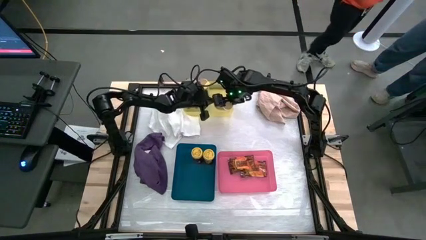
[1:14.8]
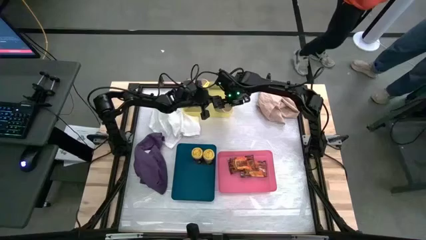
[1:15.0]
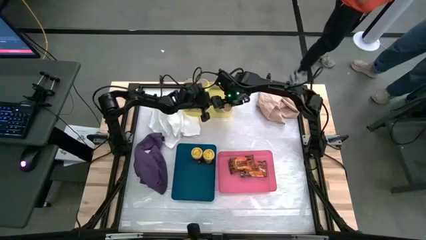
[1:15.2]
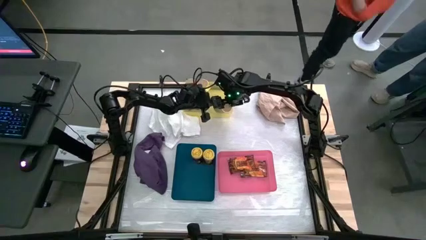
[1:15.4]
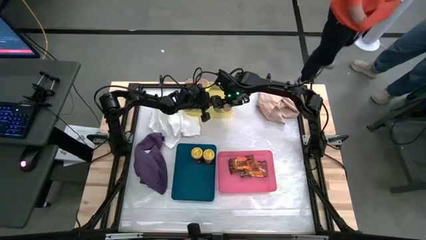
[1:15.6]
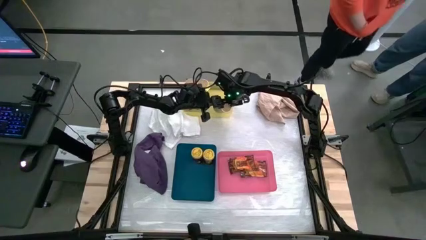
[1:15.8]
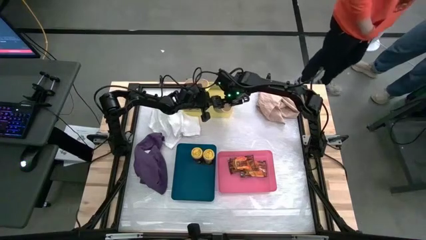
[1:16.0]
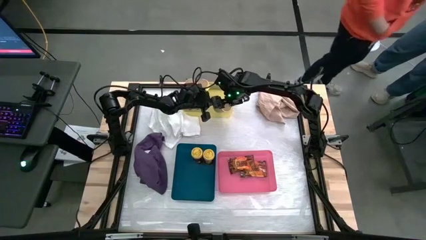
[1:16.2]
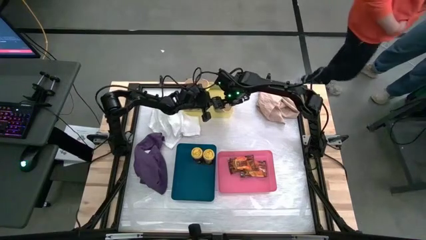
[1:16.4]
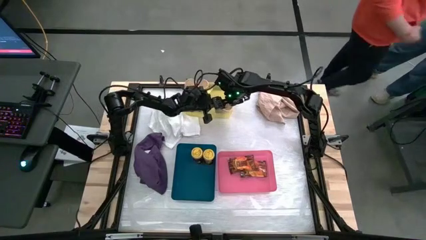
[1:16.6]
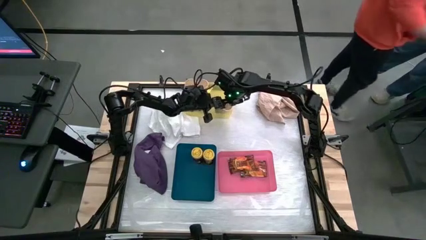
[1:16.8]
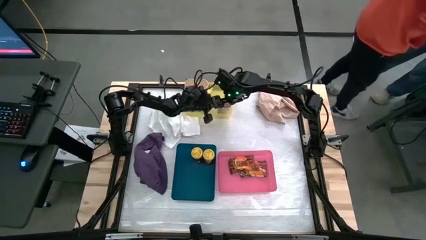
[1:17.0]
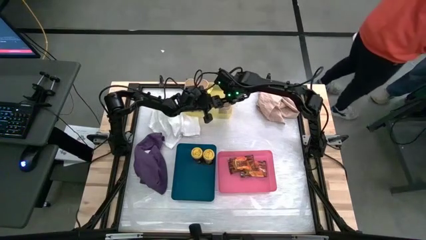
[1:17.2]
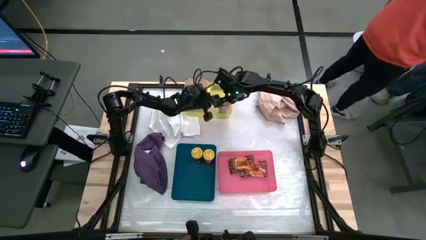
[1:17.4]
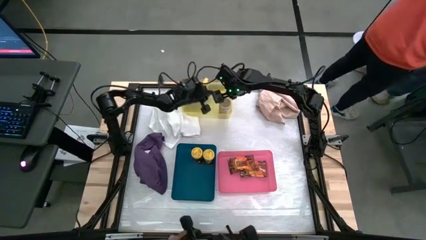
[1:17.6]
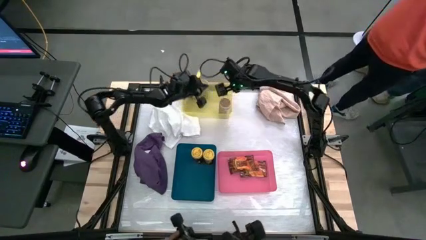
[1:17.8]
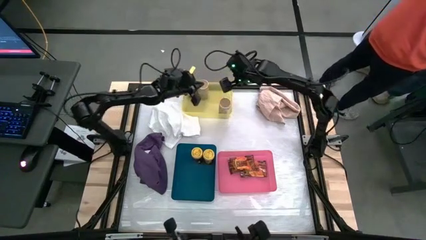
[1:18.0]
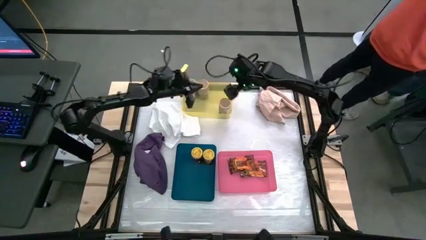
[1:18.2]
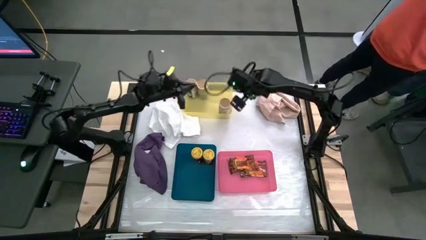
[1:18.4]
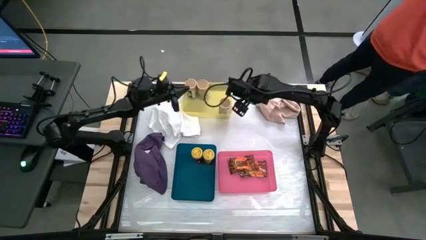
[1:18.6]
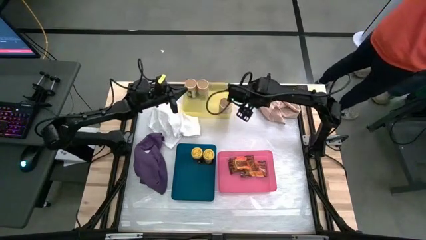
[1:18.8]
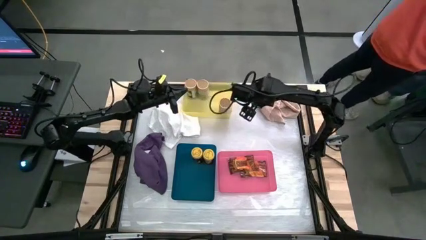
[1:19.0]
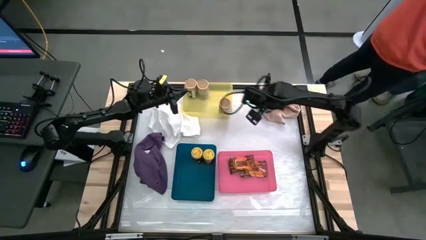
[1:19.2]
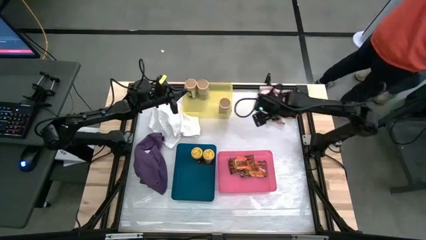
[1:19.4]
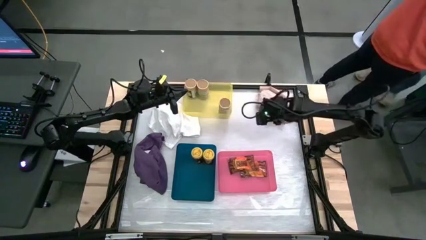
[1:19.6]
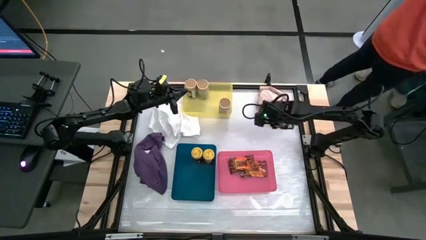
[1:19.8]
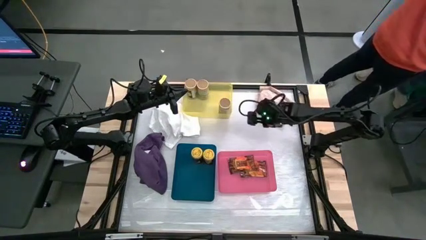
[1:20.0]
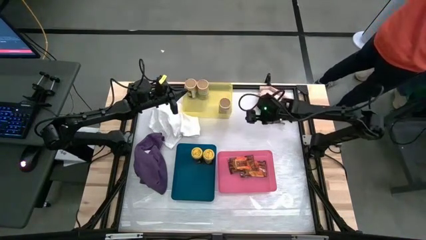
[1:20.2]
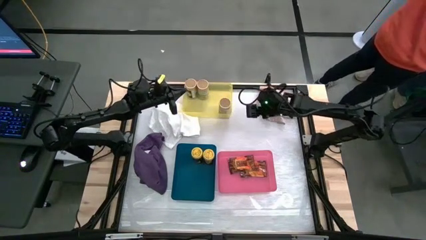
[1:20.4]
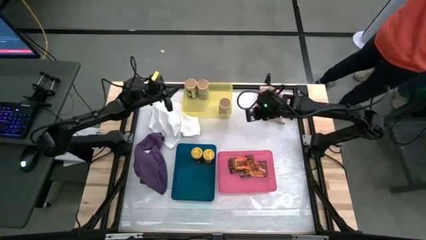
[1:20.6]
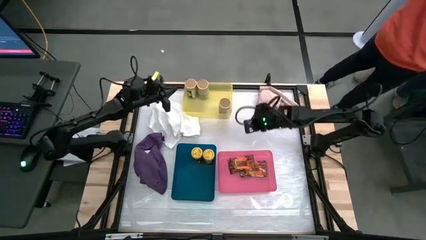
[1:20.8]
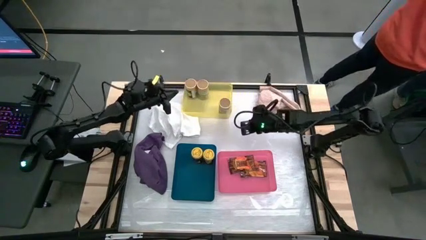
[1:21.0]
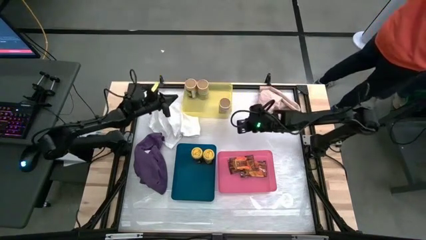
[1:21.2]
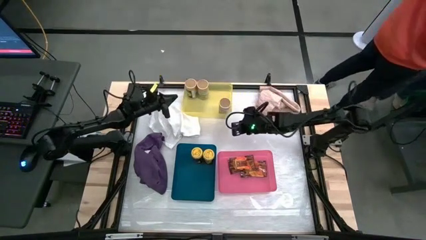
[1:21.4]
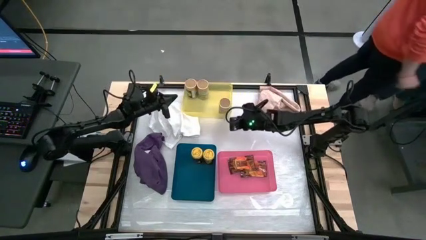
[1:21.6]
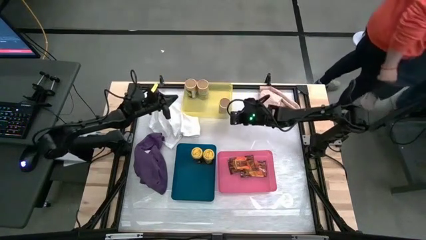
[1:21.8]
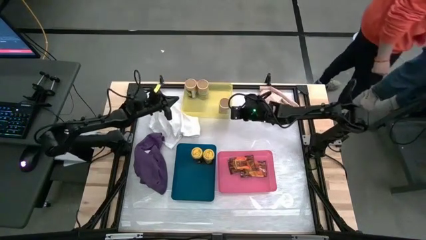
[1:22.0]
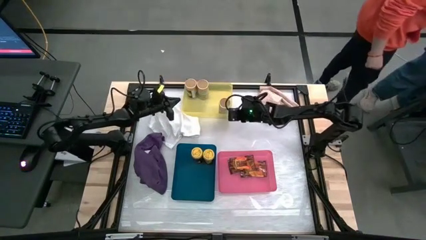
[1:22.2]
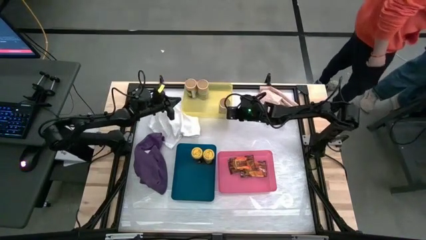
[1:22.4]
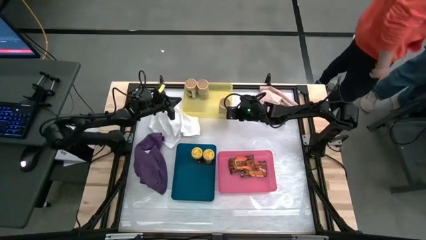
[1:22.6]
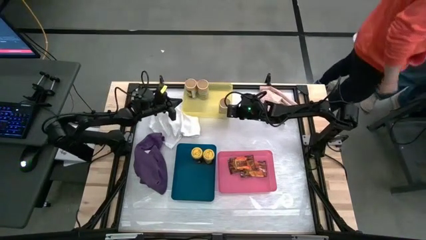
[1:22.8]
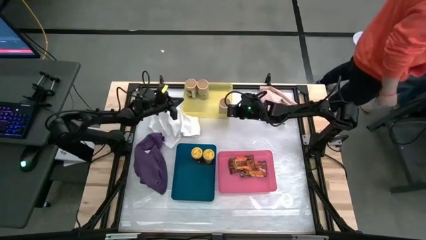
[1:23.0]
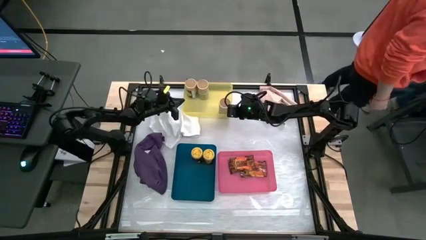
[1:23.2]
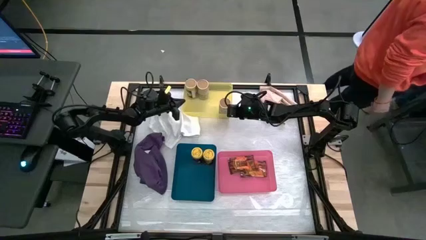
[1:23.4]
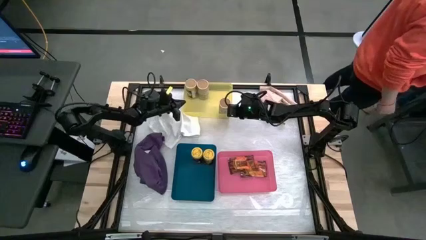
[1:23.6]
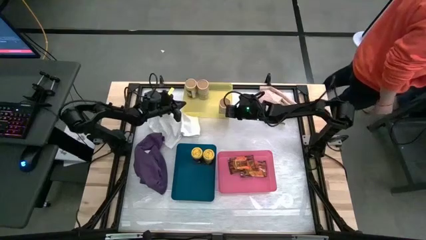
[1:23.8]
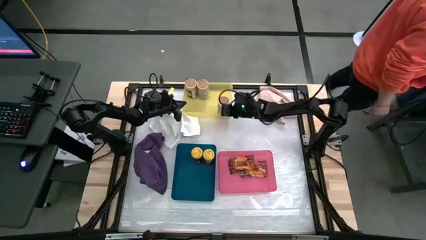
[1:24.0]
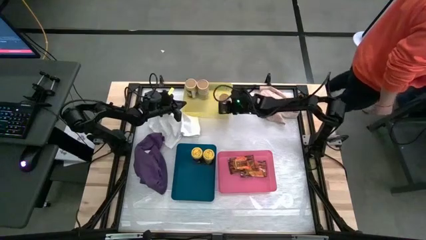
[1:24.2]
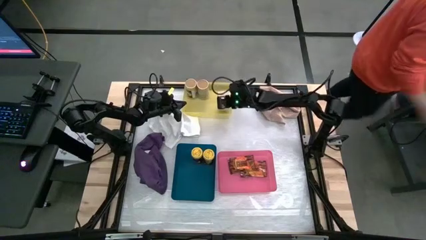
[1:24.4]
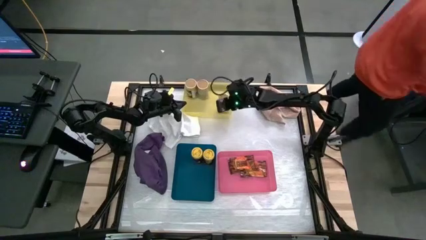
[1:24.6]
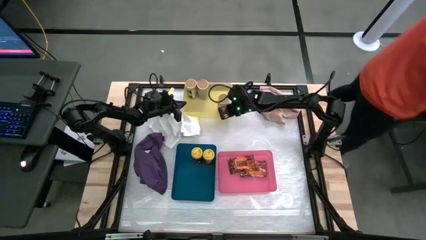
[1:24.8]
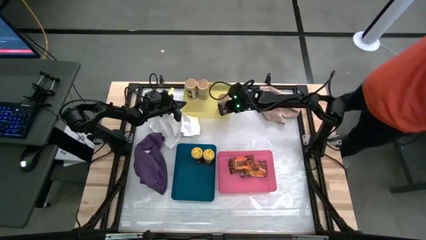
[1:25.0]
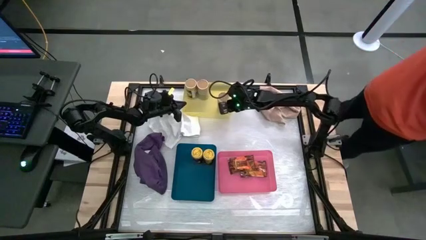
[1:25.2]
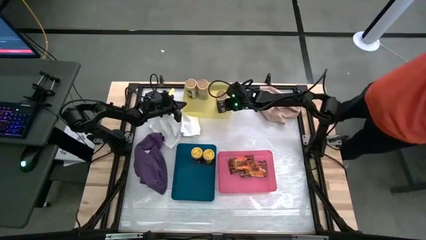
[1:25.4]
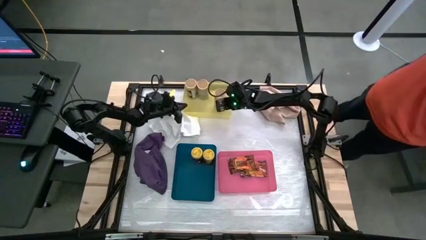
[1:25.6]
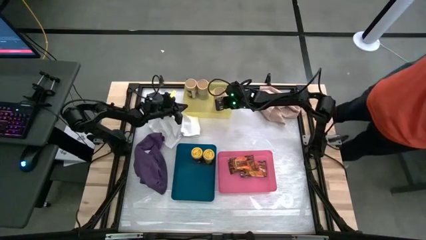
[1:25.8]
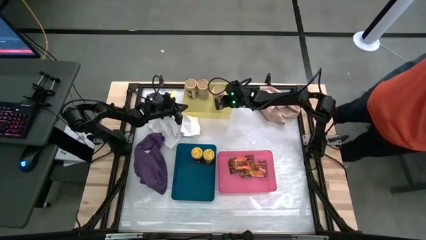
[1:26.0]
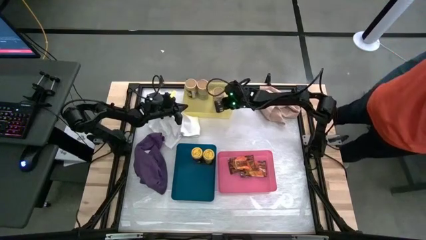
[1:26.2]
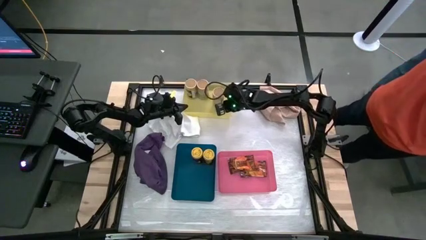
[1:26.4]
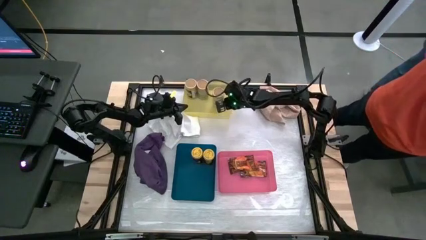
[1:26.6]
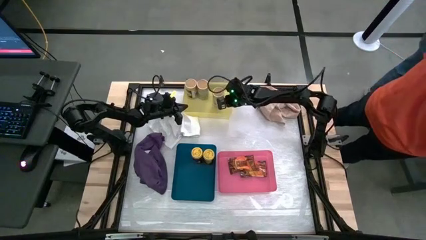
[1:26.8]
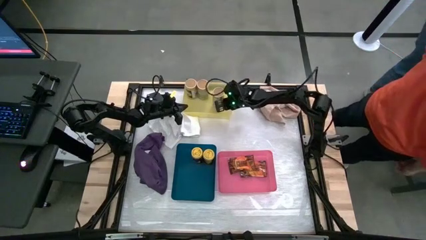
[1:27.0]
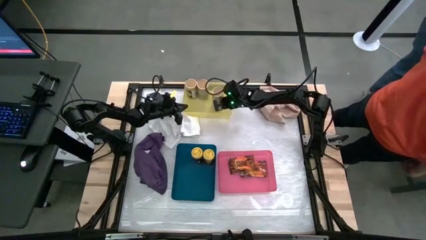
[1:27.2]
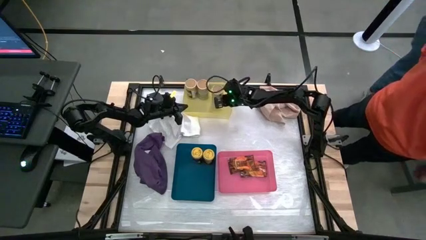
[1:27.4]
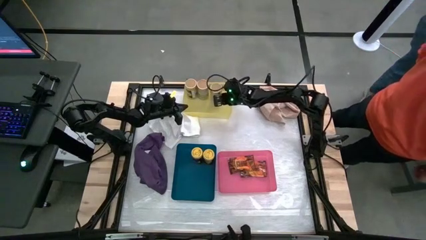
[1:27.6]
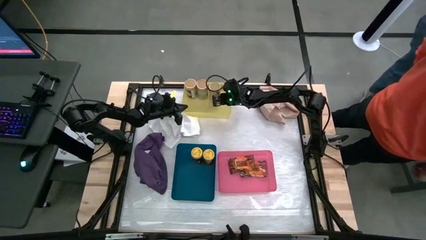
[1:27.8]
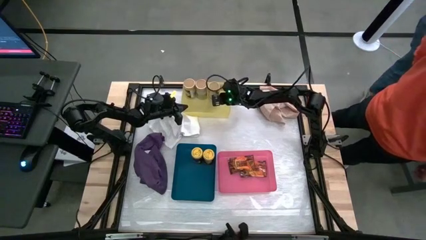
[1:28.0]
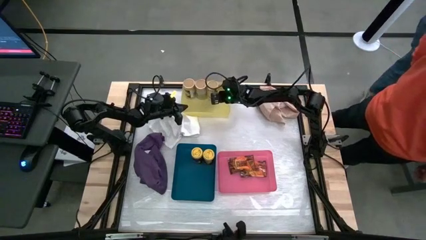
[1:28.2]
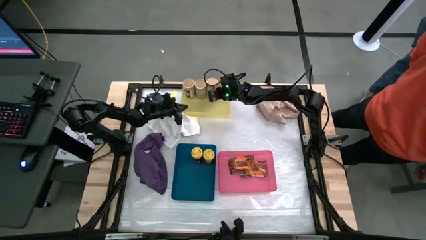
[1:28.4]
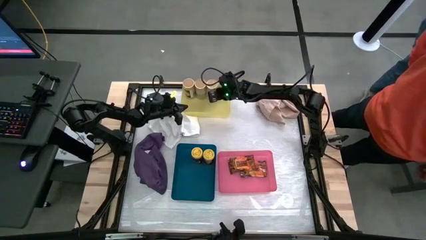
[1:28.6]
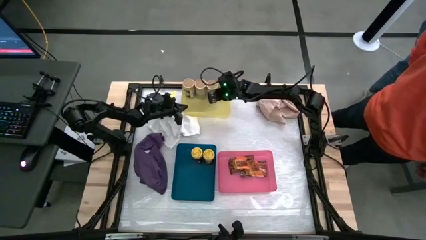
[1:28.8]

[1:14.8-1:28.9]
Task: Sort spices by type
Put the golden seasoning bottle into the yellow bin aligned with the other golden seasoning bottles
